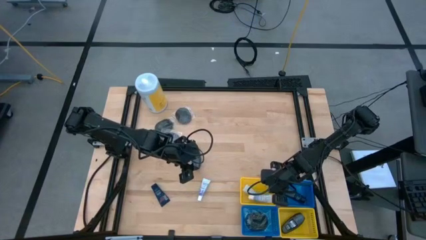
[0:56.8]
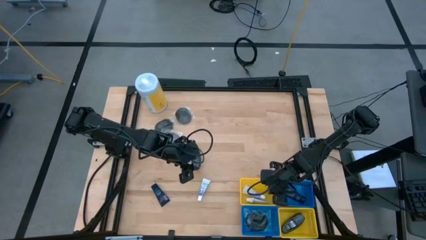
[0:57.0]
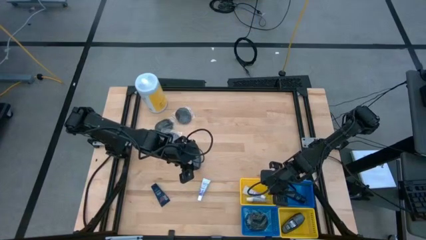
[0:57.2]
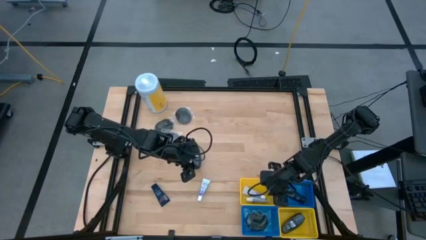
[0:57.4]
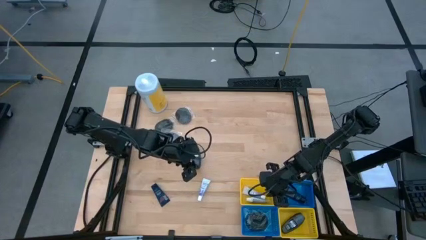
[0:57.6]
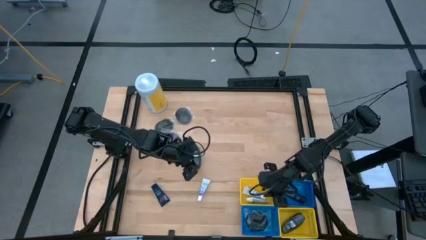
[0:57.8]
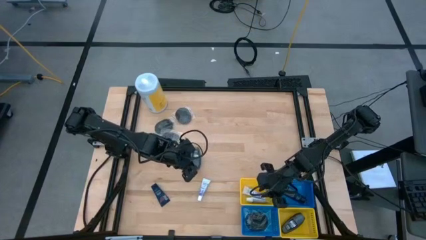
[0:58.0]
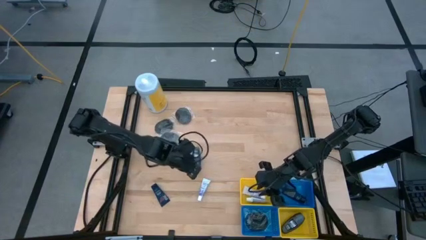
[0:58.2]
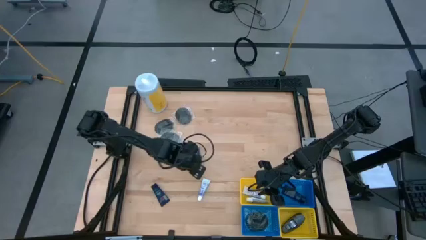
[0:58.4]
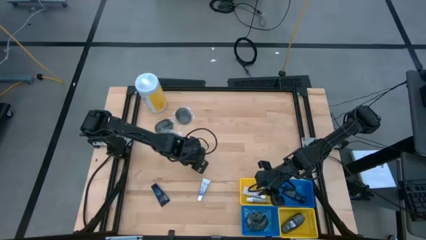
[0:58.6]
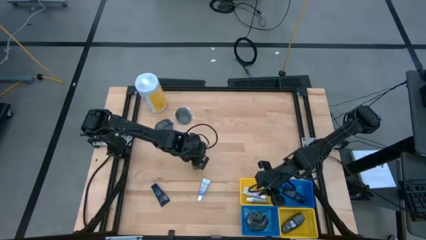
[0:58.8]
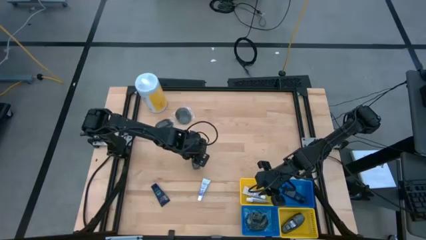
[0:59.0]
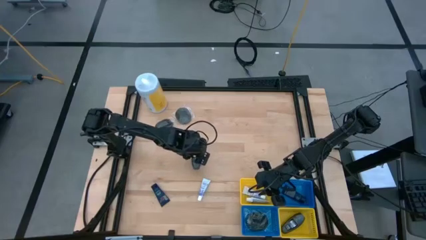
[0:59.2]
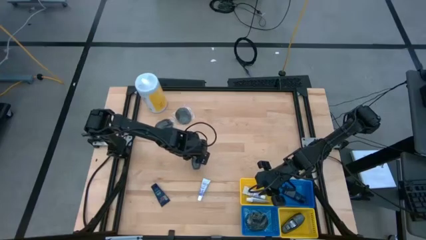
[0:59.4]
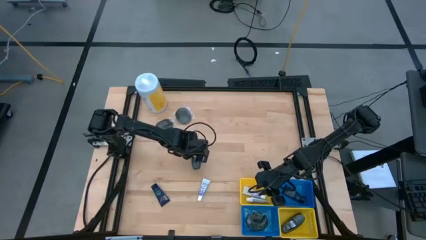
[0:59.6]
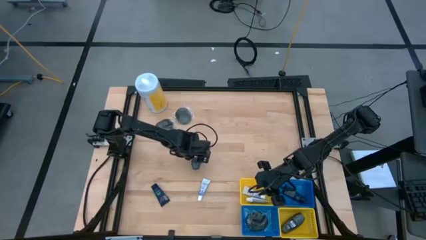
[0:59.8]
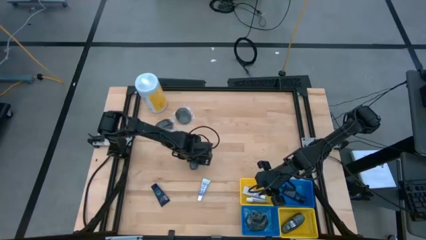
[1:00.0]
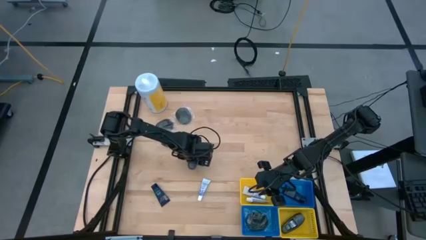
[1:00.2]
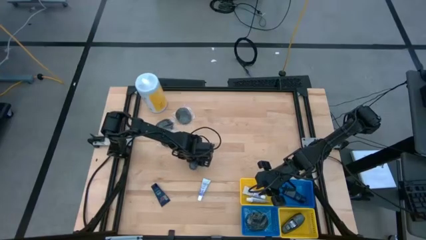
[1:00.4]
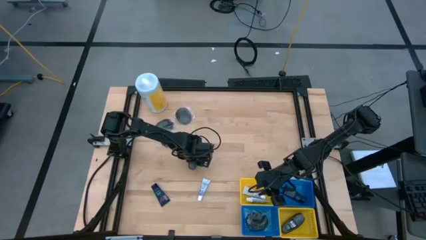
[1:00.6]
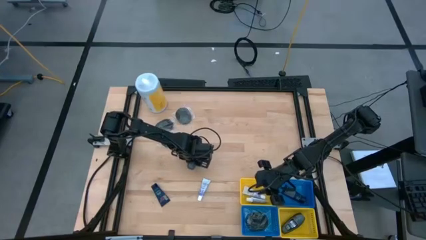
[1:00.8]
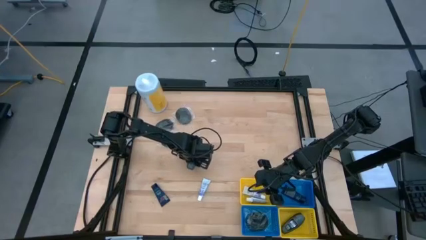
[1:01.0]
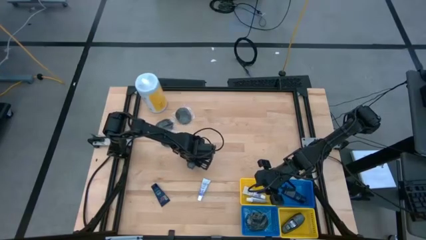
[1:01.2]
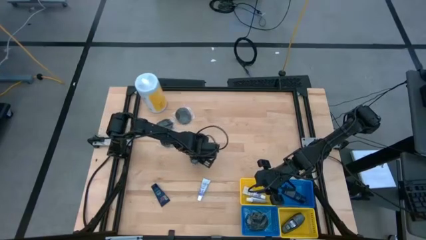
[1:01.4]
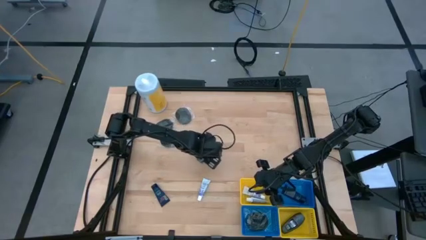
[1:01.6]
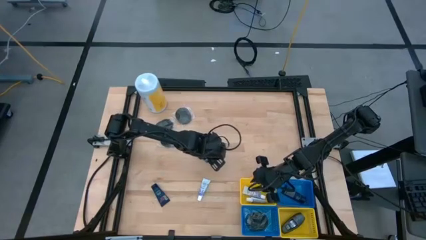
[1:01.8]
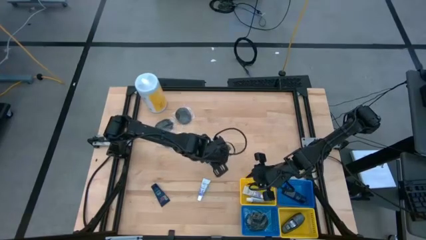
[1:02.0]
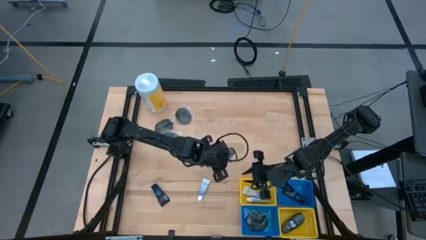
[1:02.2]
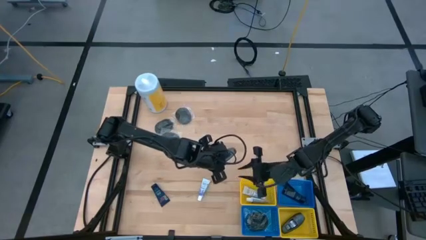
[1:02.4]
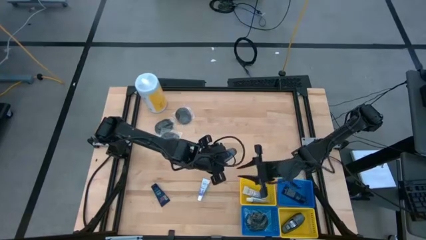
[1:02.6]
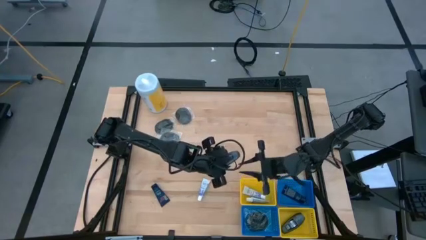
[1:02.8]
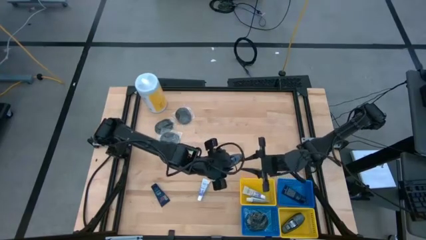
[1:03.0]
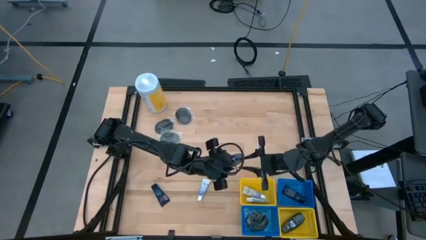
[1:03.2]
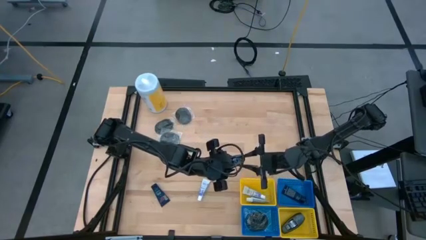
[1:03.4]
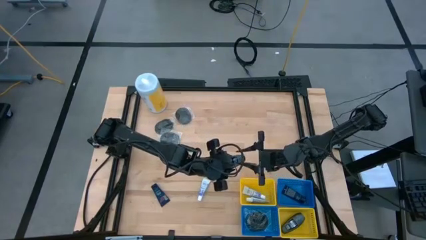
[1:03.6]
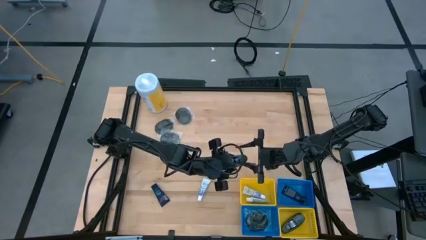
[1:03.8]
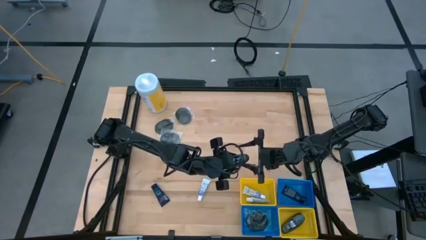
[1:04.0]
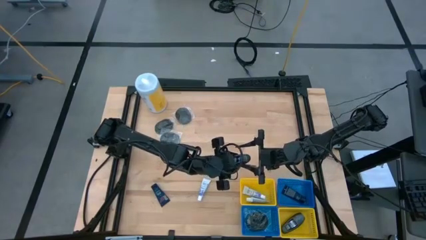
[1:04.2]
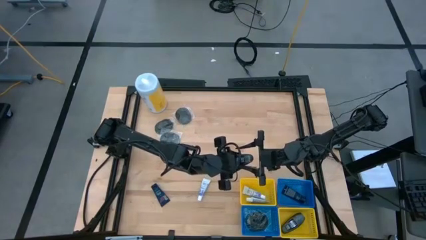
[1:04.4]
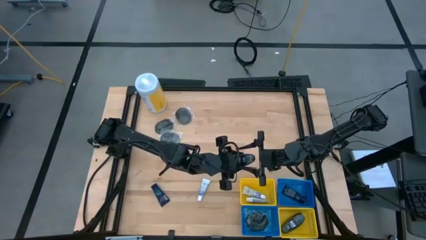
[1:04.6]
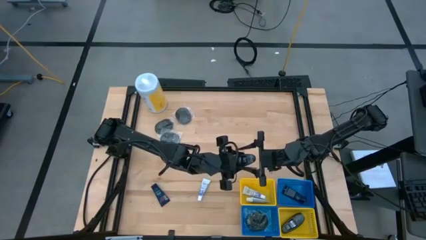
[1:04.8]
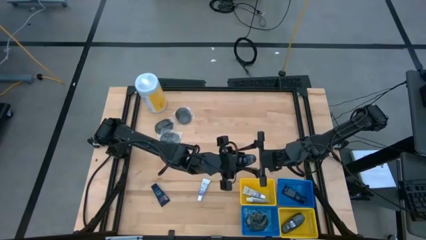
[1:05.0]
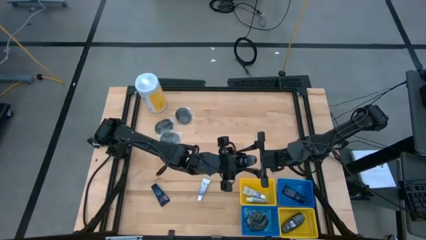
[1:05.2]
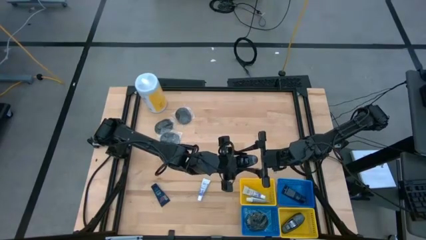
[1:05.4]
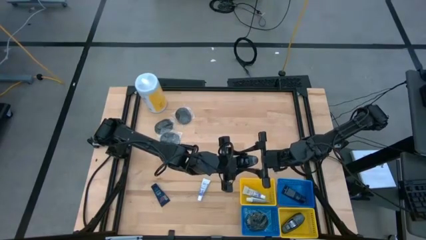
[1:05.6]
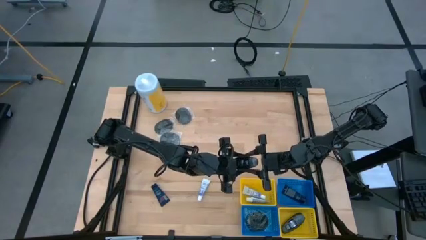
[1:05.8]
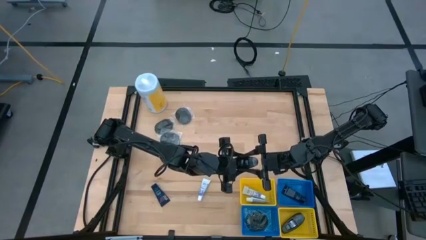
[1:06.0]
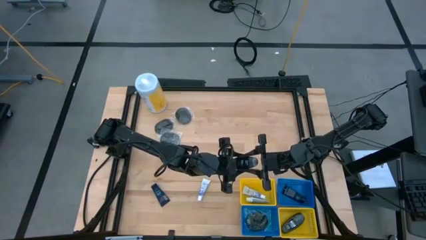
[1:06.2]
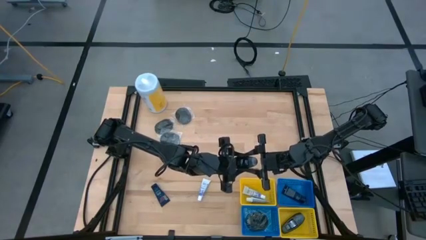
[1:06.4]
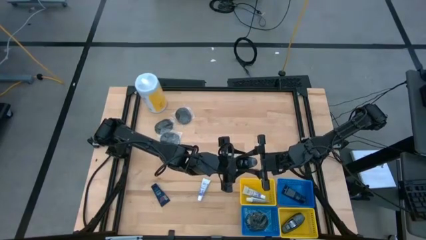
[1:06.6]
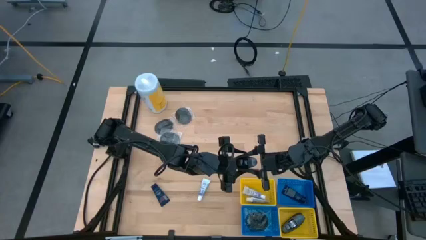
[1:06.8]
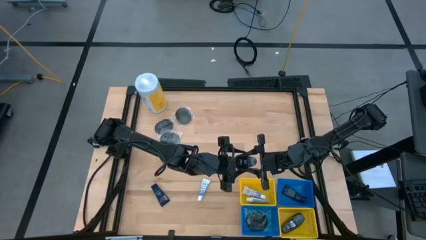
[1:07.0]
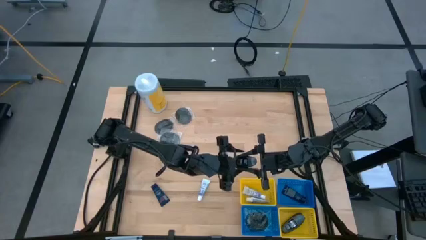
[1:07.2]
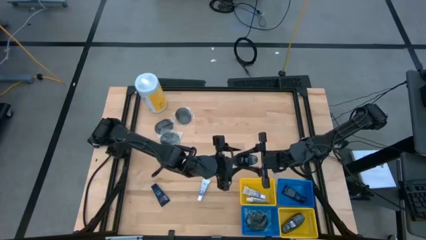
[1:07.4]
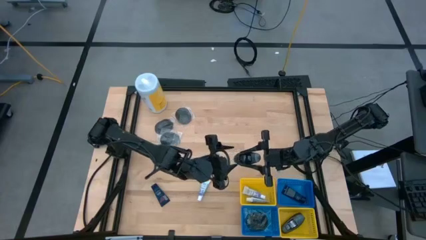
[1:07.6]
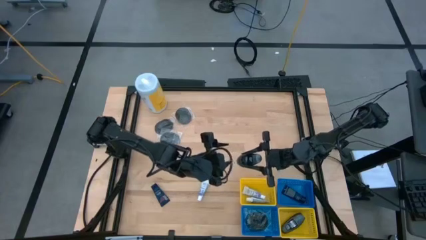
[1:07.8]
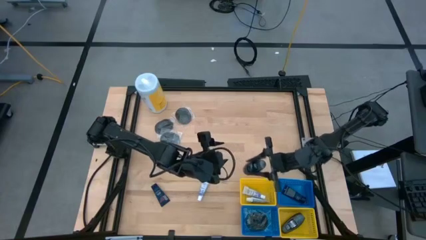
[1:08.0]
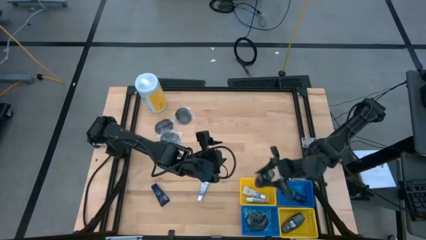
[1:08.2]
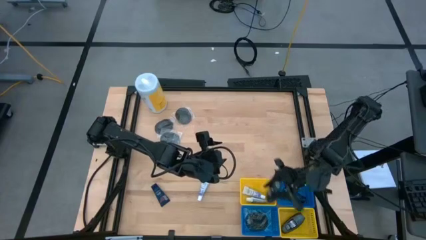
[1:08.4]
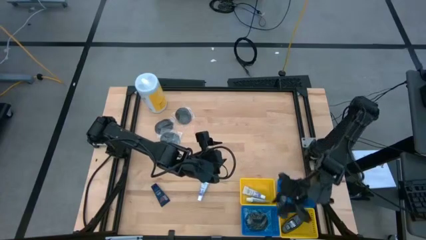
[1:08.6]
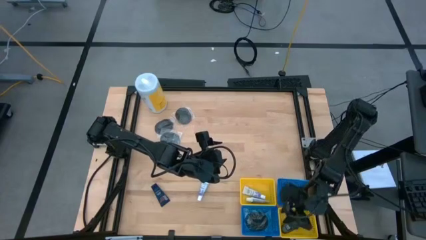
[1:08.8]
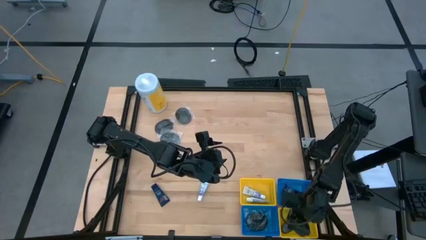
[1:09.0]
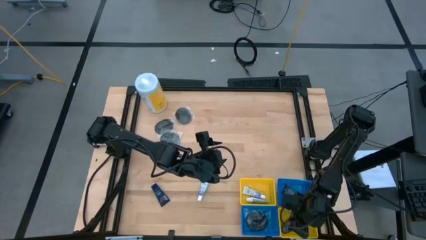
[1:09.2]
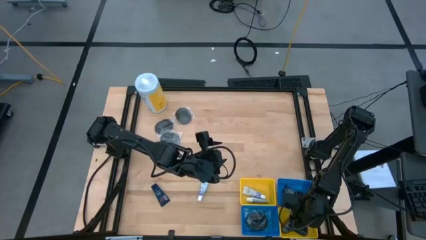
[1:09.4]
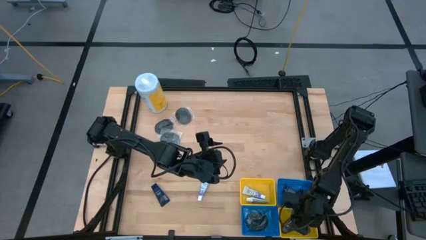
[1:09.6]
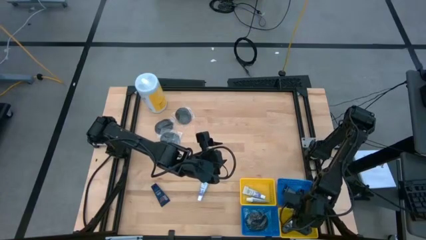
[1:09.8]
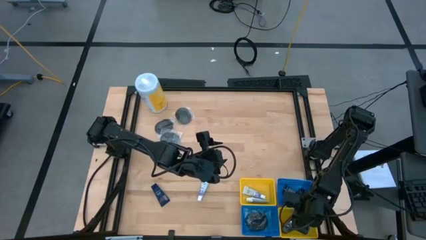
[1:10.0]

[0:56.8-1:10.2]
Task: Pick & Place Travel size toiletries
Put the black deodorant into the bottom yellow bin

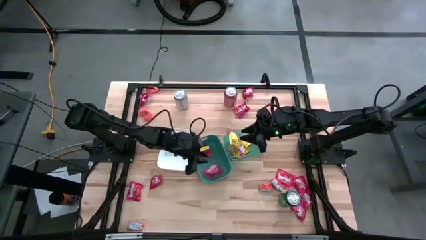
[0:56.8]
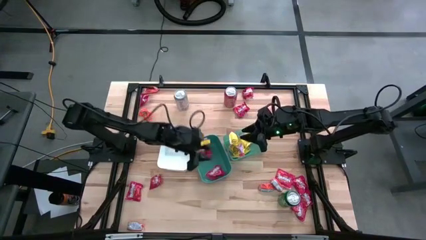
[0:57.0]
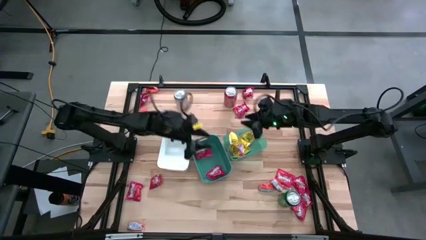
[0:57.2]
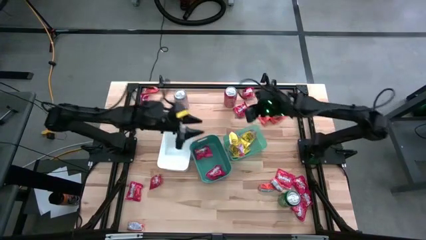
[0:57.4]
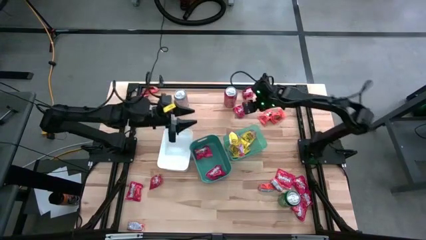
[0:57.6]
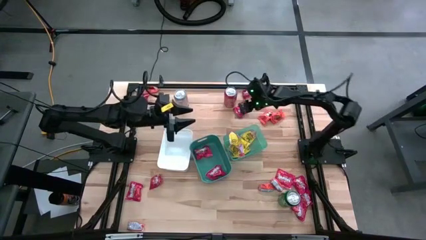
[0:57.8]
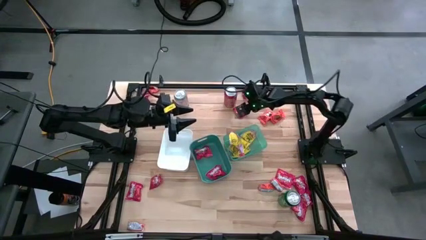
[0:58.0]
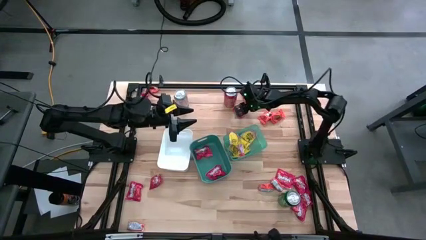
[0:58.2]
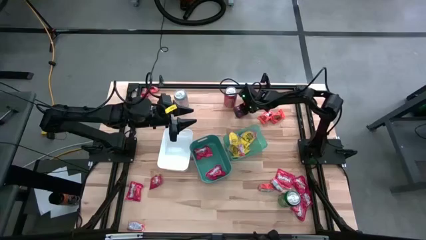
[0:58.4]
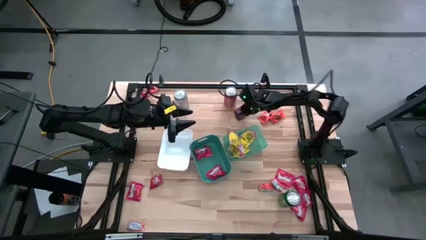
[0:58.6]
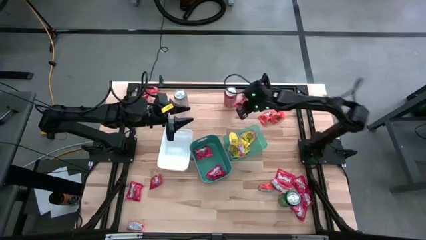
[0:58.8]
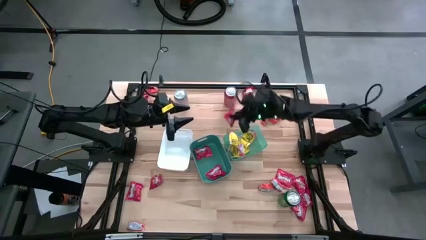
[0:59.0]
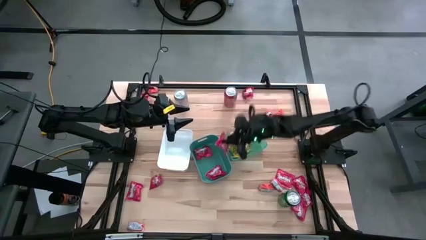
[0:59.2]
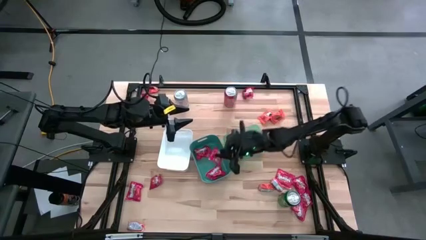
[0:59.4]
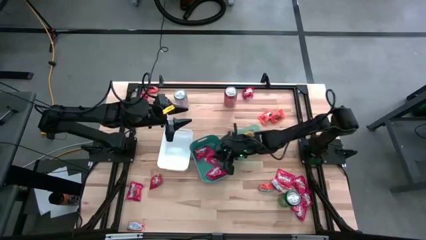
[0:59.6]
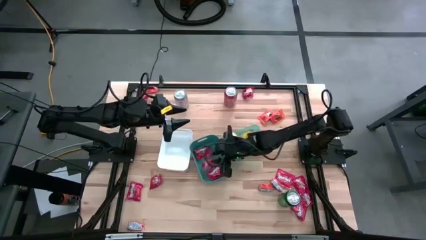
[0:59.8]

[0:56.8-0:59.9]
Task: Sort candy
Put the red candy into the green bin
